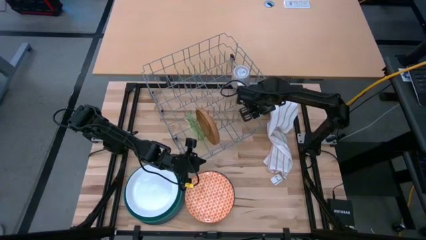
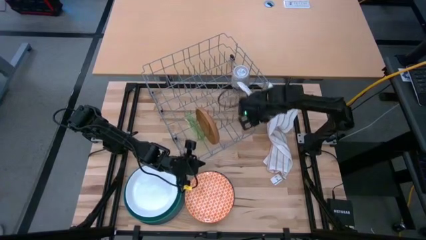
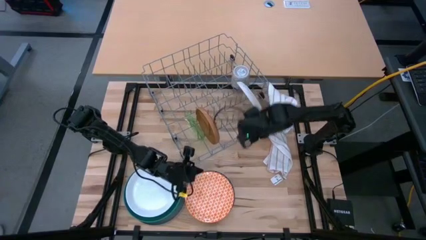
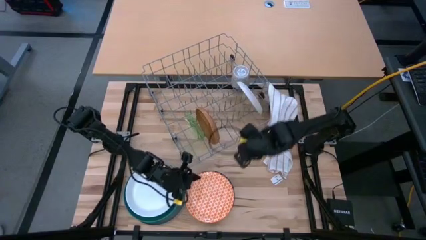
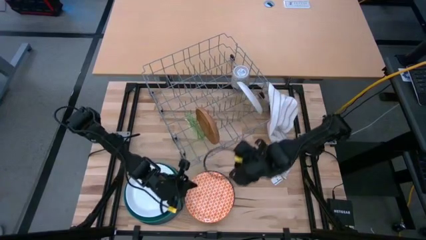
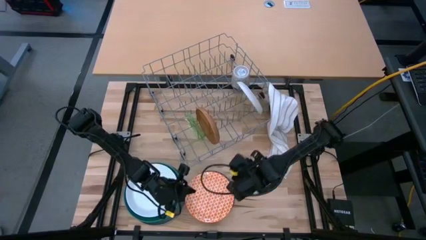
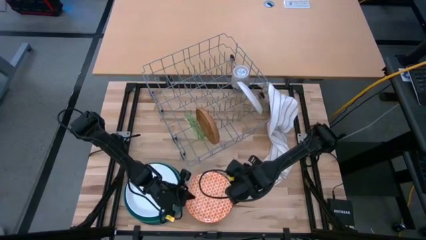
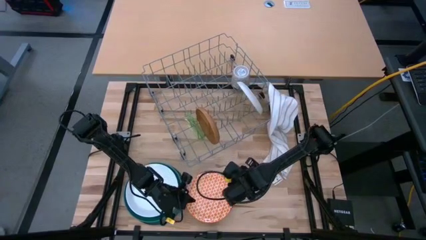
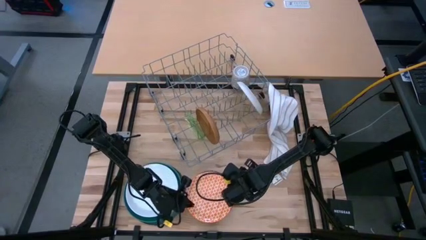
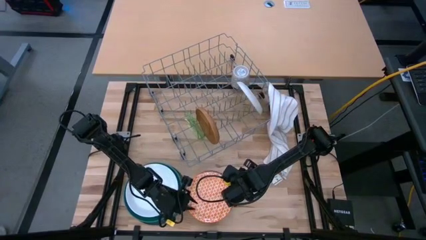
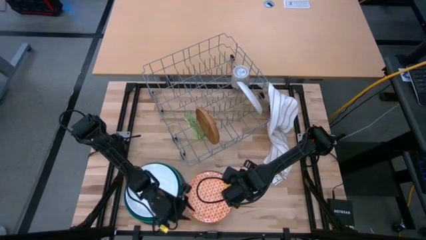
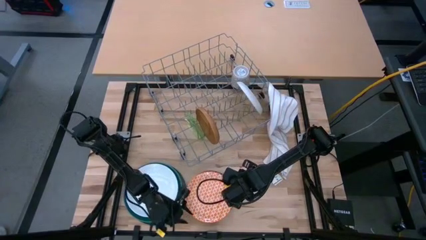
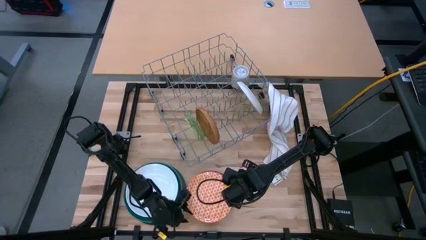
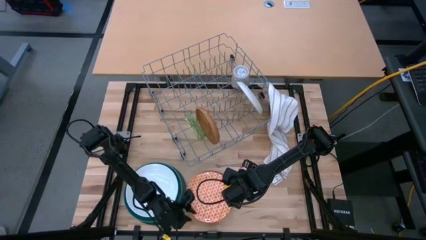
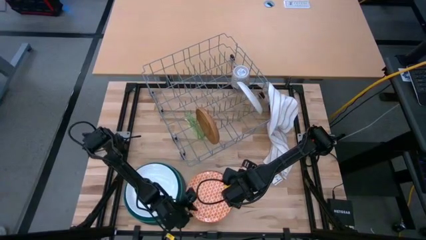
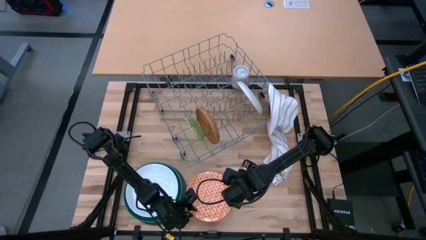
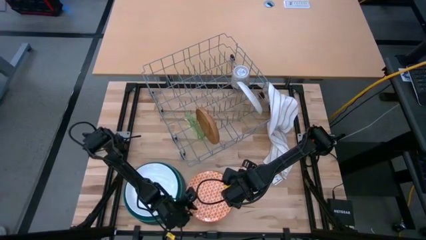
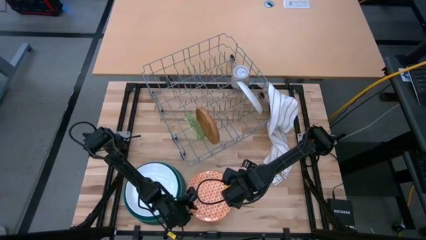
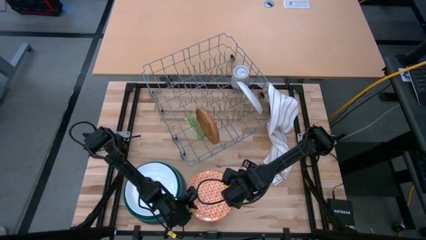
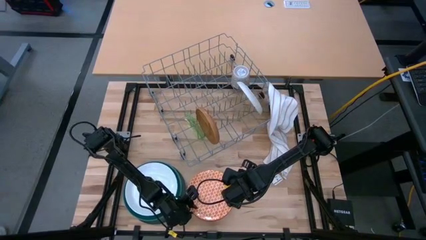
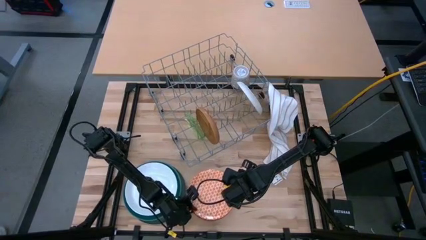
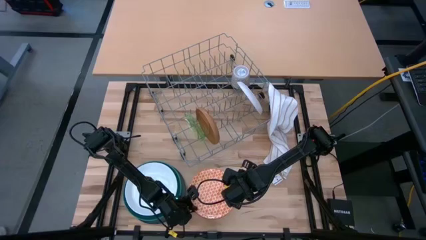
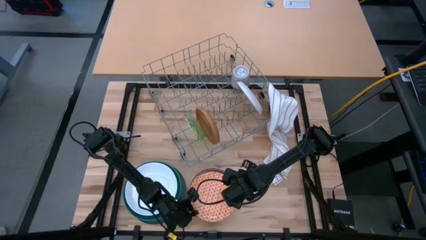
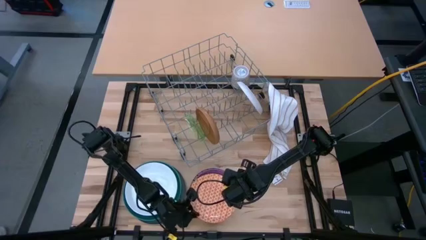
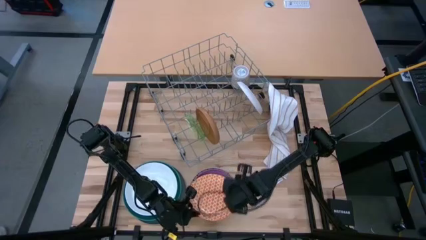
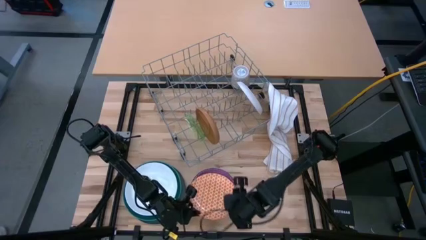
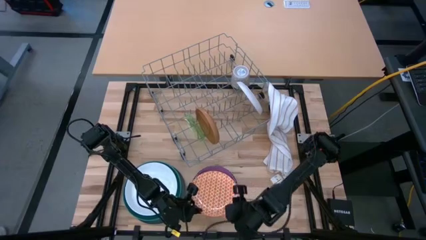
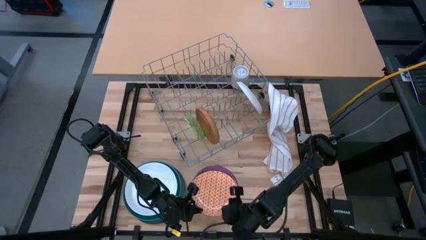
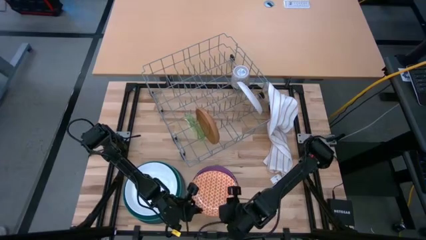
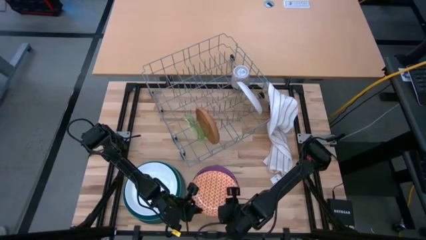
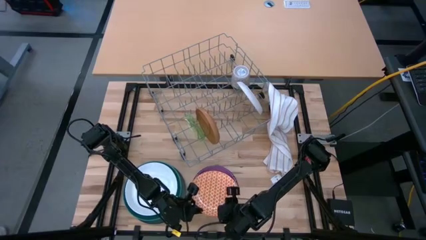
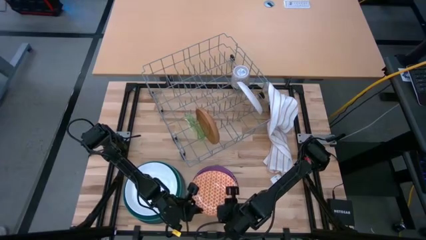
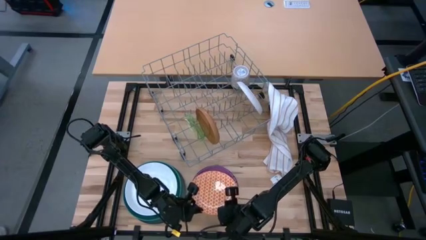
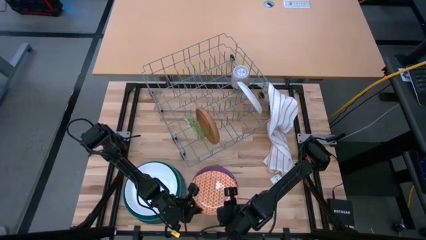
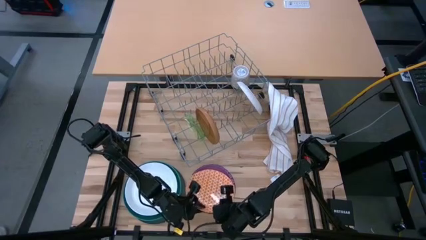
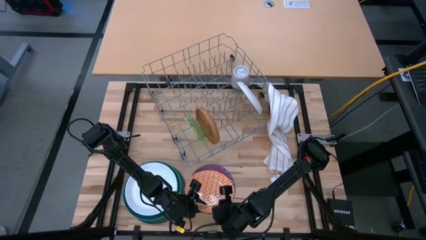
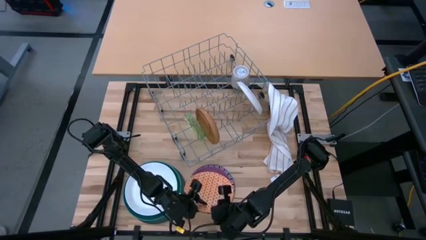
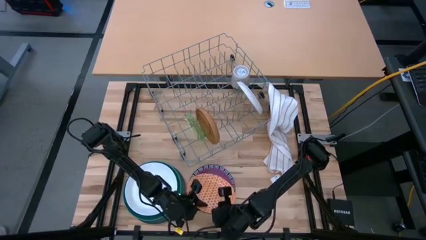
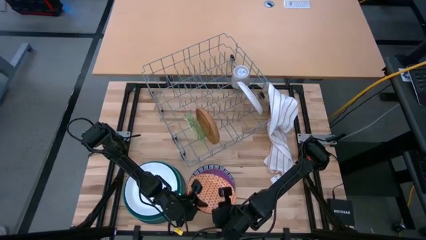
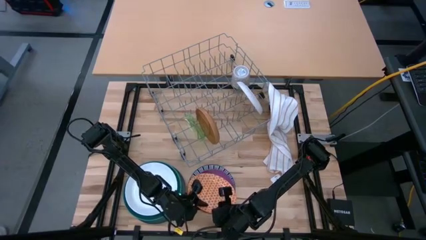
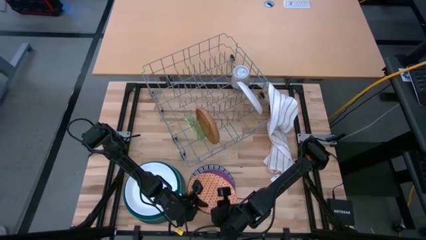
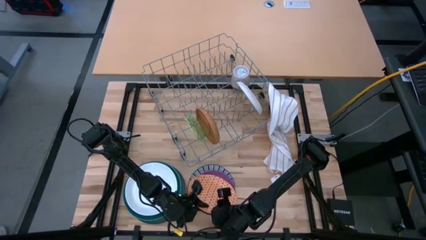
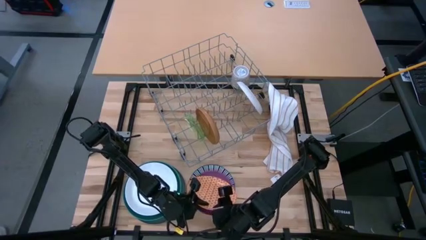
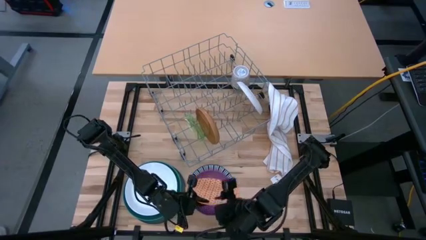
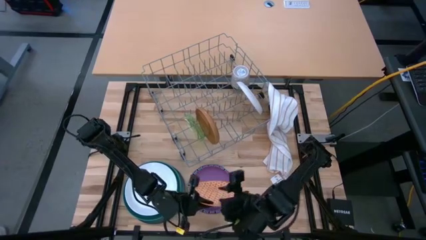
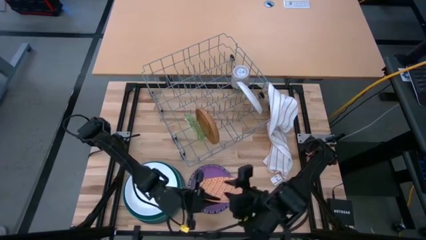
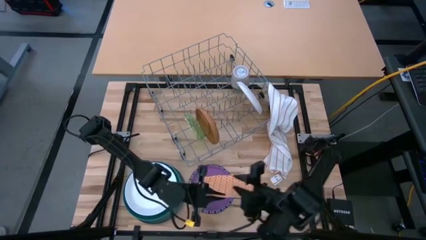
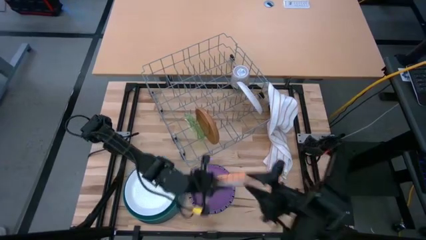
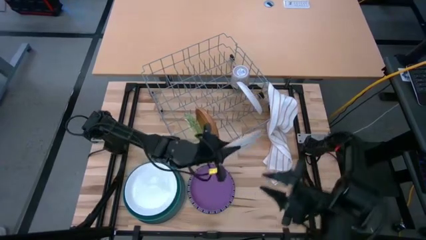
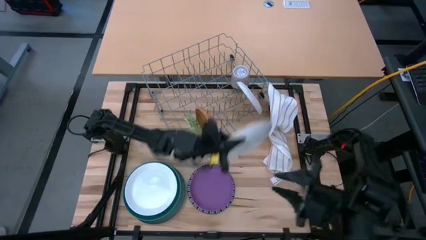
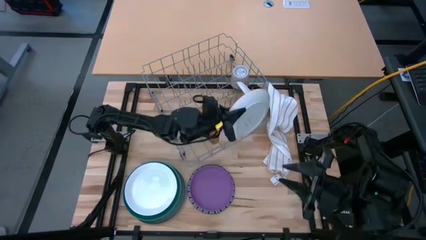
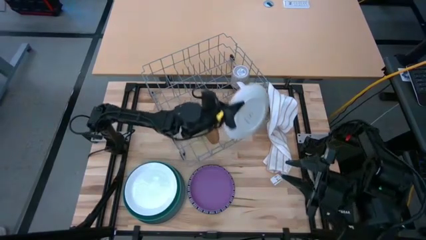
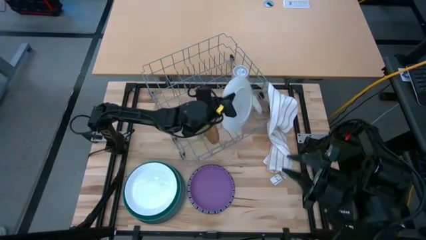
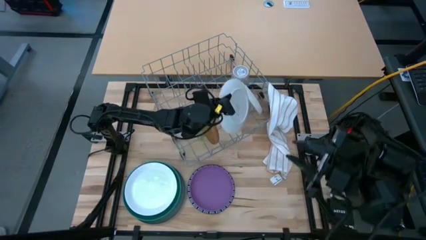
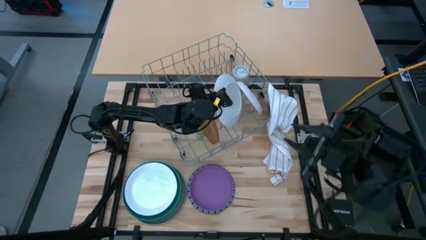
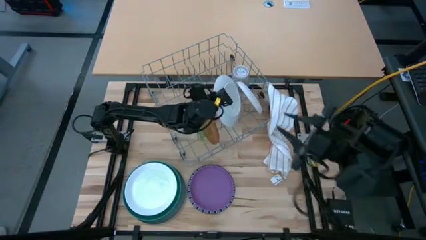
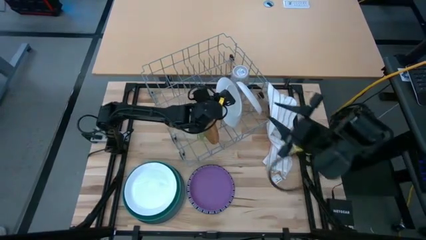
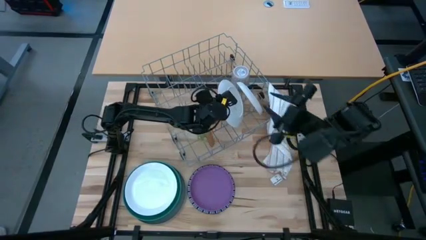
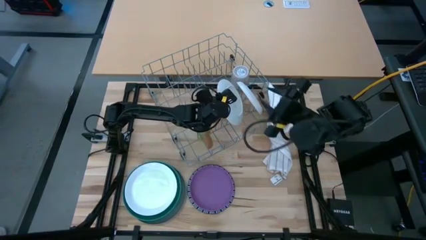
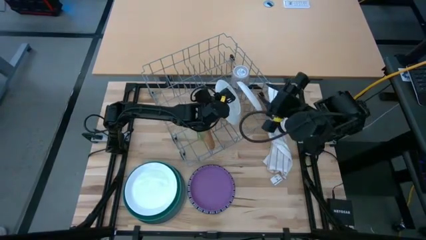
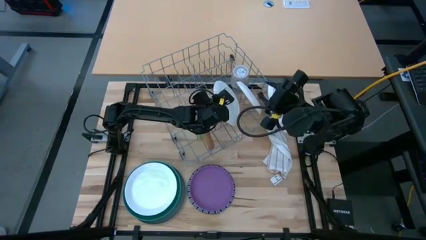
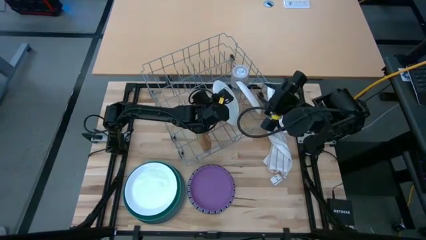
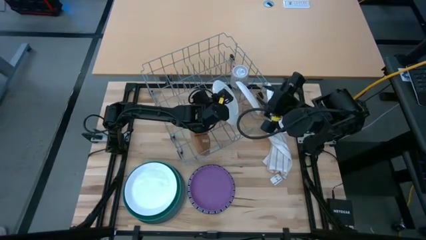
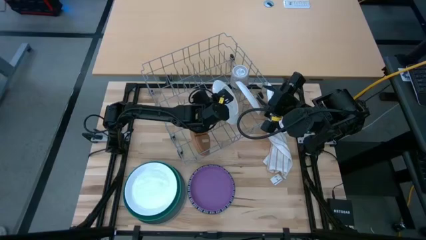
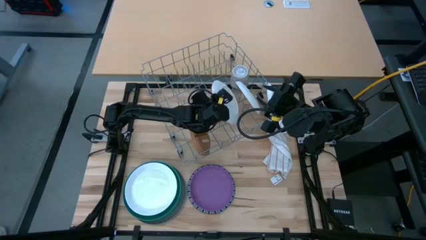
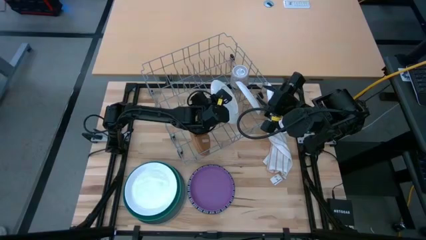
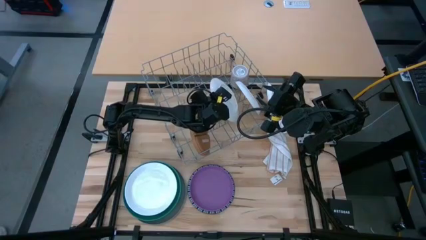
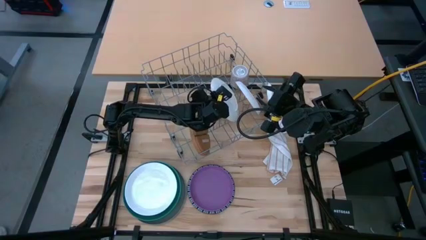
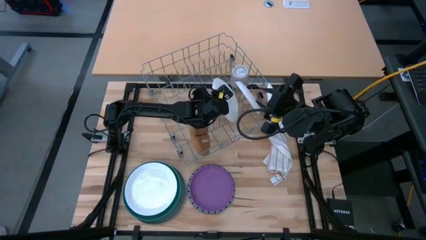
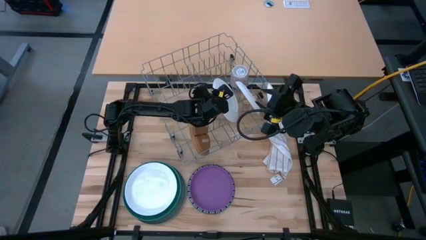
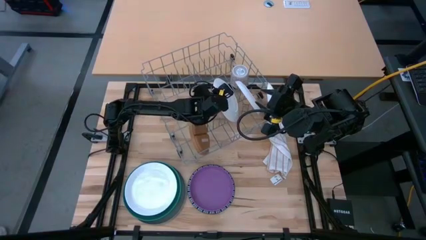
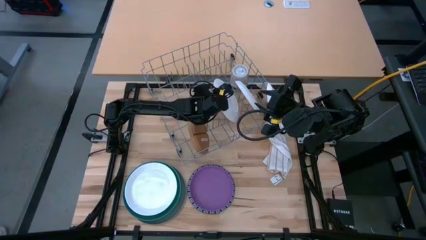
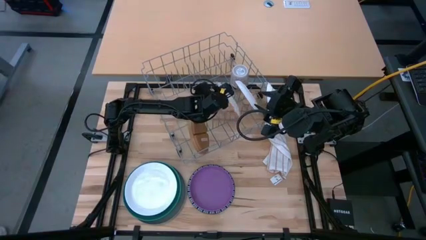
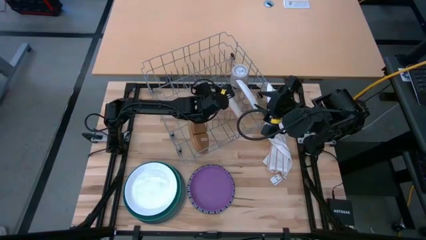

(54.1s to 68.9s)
Task: Sort dishes
Put the orange plate into the dish rack
